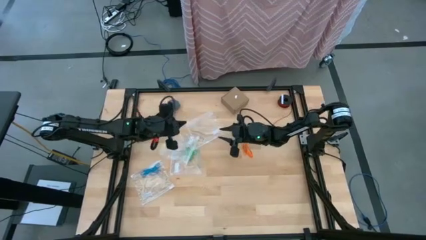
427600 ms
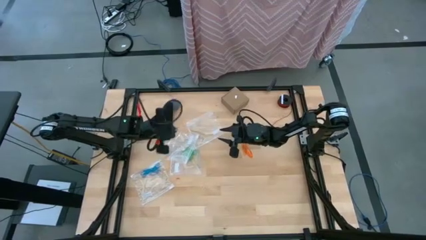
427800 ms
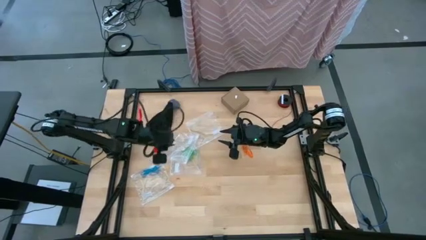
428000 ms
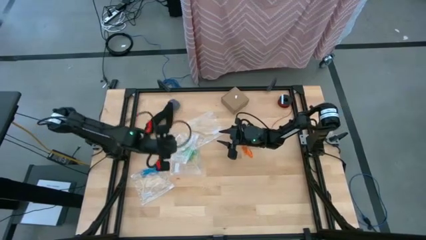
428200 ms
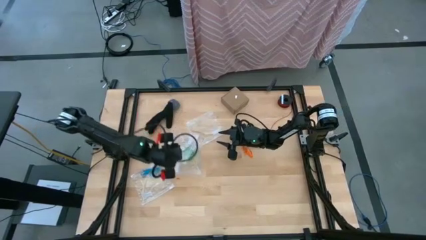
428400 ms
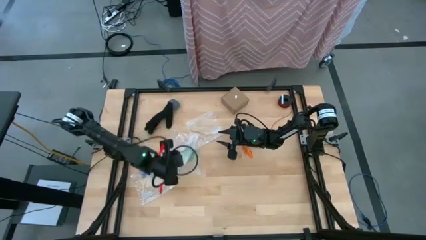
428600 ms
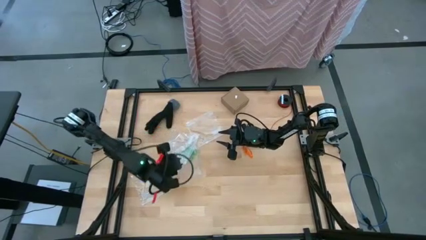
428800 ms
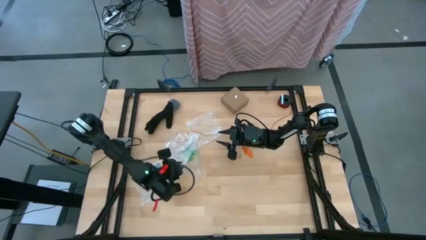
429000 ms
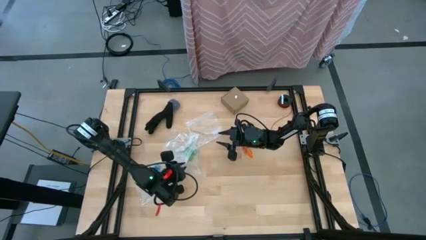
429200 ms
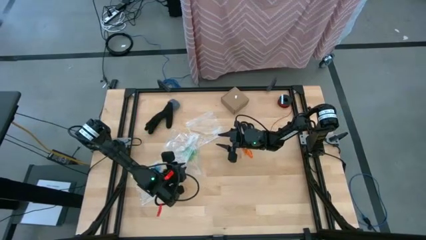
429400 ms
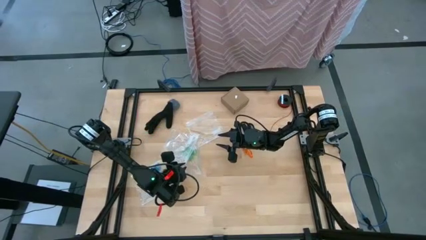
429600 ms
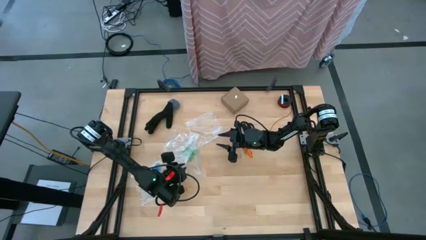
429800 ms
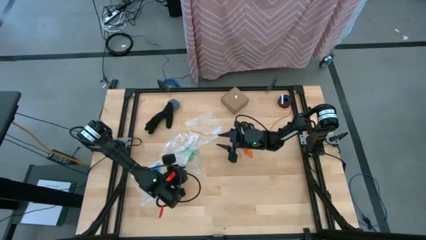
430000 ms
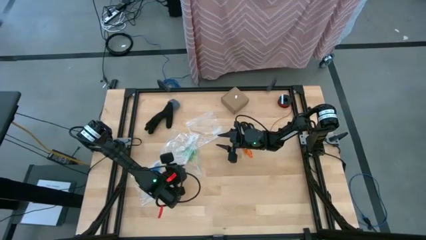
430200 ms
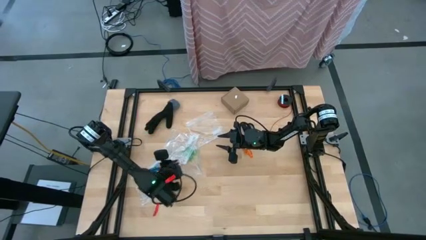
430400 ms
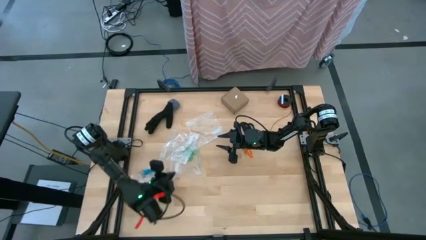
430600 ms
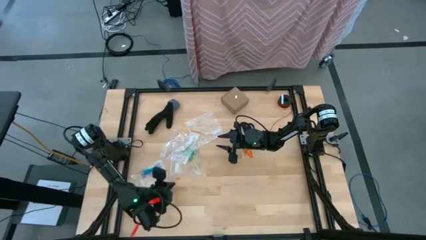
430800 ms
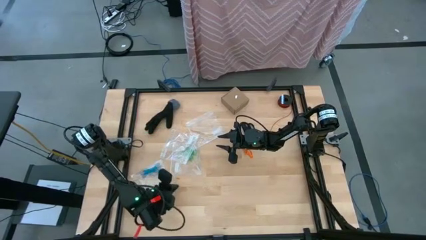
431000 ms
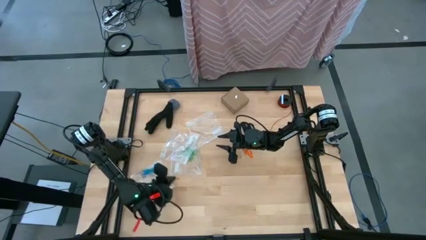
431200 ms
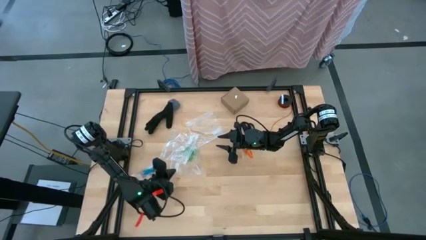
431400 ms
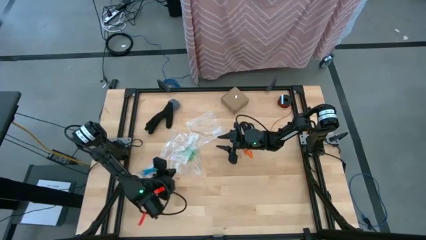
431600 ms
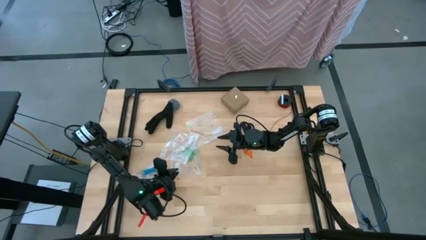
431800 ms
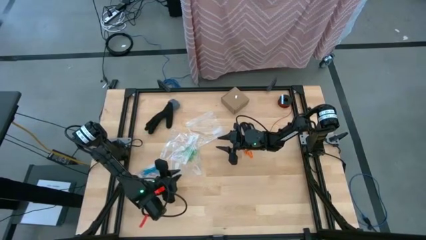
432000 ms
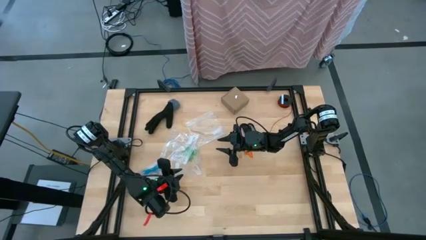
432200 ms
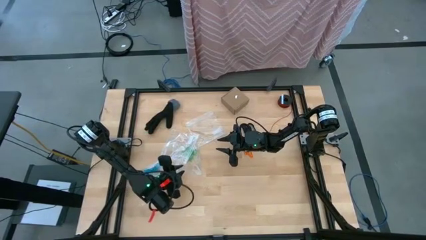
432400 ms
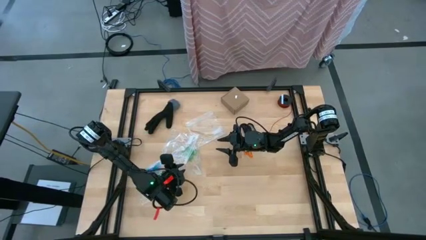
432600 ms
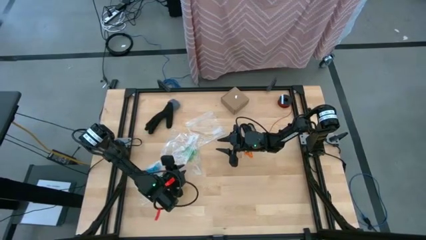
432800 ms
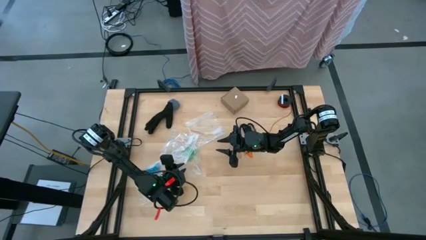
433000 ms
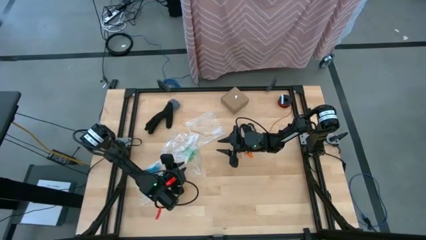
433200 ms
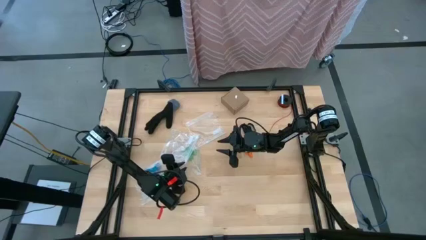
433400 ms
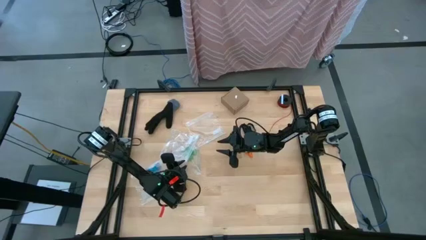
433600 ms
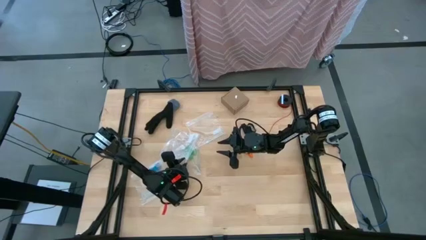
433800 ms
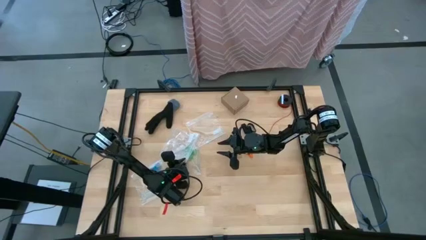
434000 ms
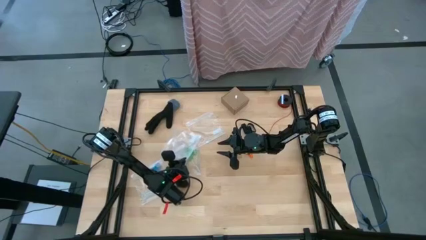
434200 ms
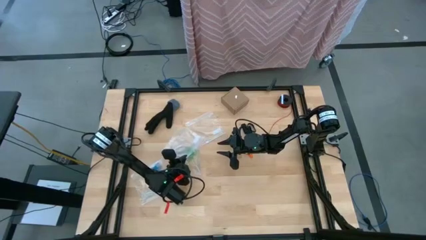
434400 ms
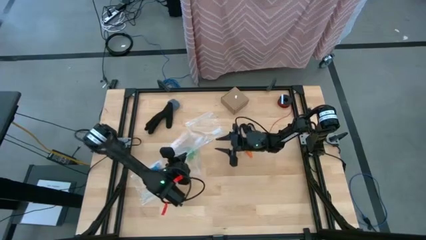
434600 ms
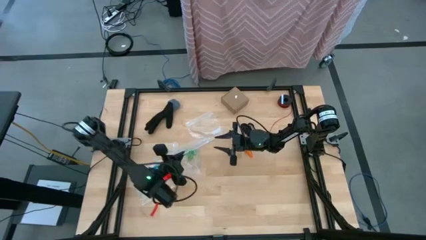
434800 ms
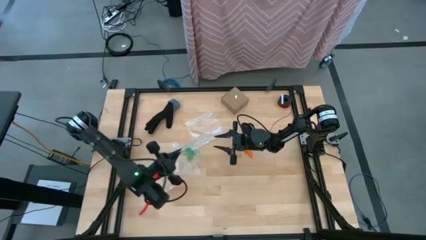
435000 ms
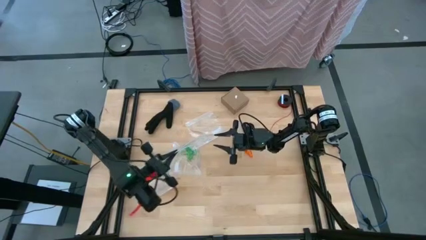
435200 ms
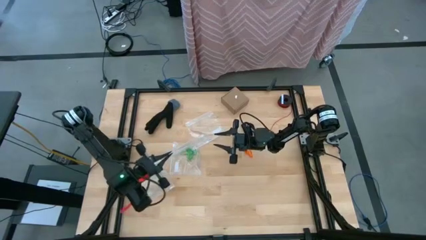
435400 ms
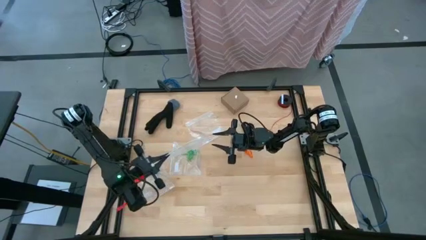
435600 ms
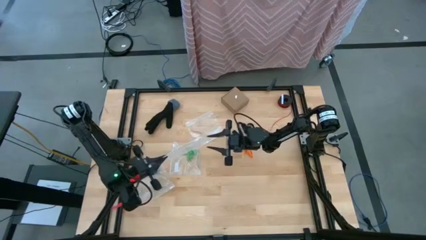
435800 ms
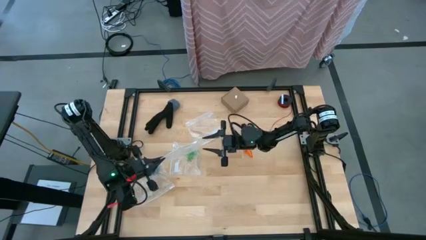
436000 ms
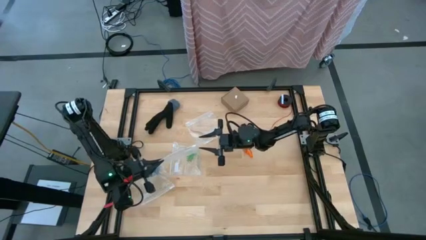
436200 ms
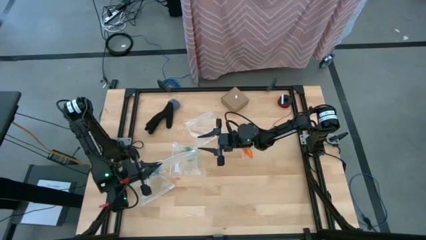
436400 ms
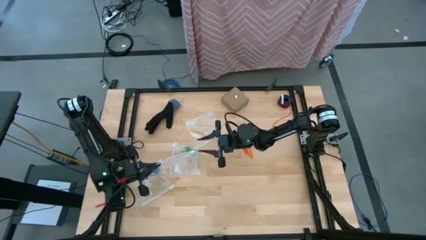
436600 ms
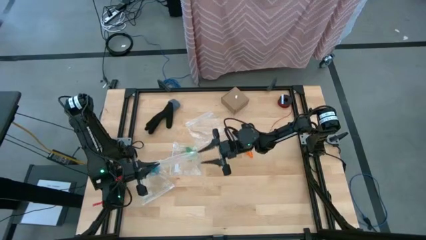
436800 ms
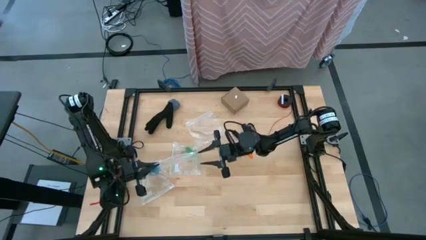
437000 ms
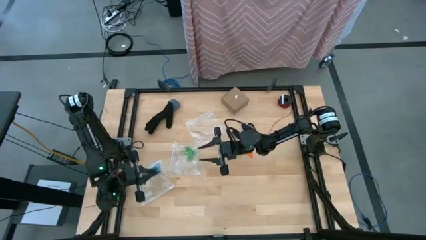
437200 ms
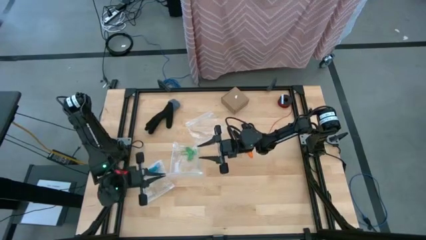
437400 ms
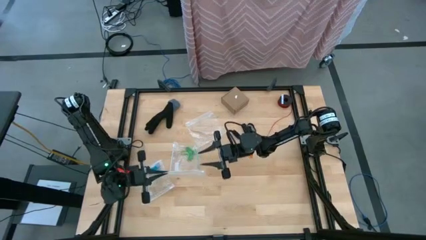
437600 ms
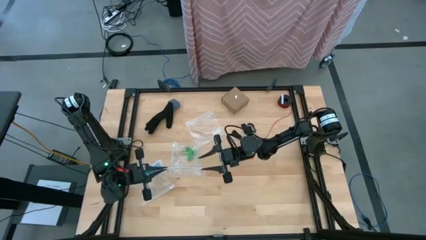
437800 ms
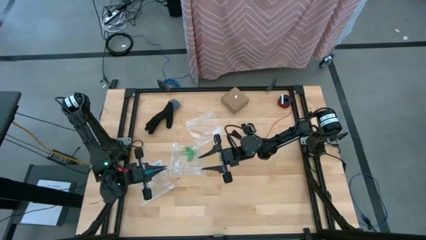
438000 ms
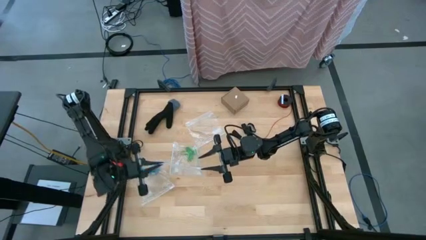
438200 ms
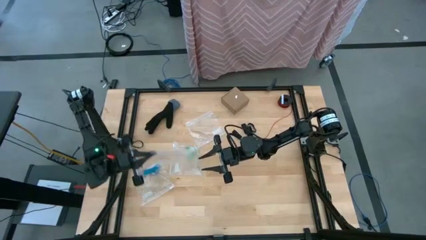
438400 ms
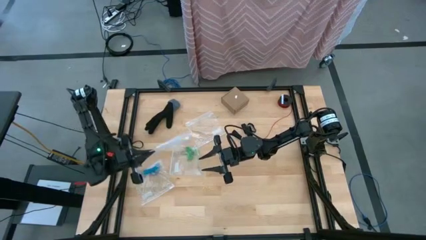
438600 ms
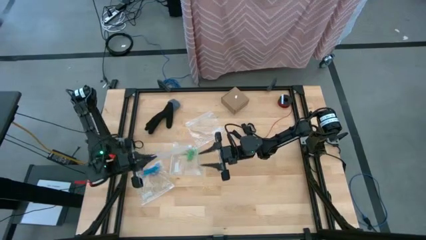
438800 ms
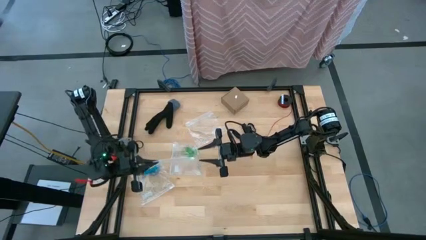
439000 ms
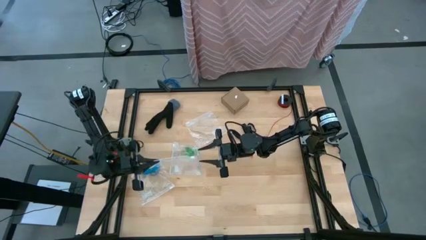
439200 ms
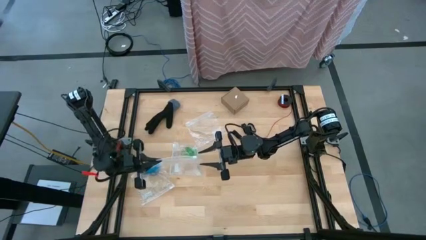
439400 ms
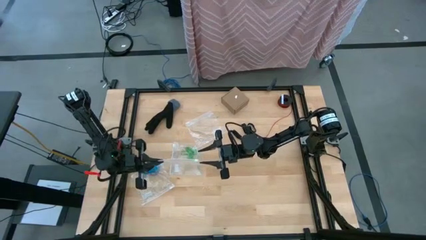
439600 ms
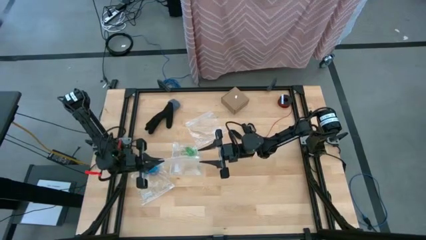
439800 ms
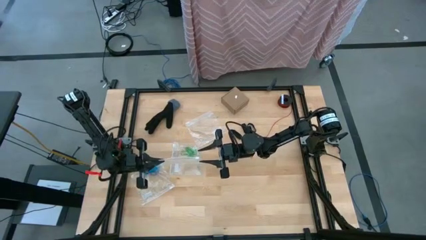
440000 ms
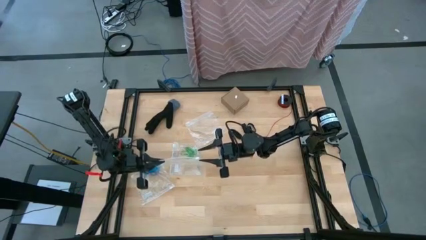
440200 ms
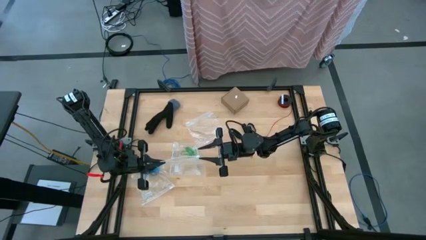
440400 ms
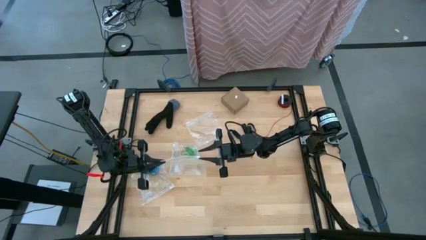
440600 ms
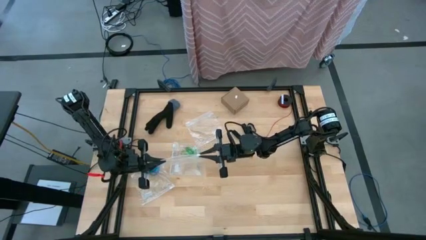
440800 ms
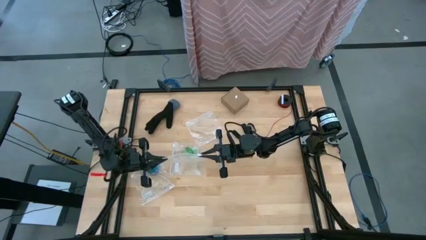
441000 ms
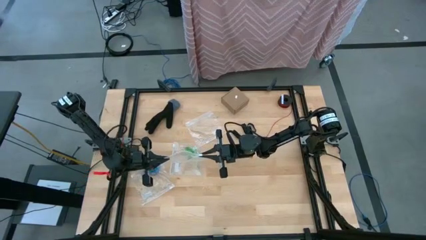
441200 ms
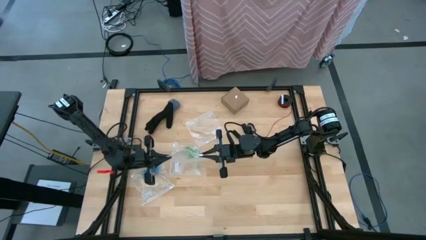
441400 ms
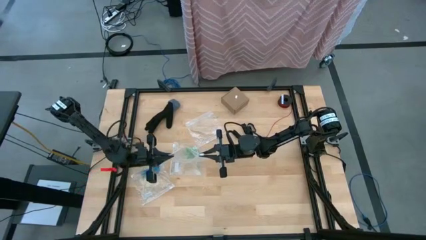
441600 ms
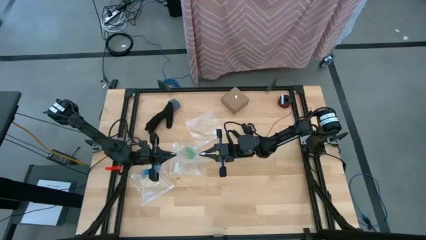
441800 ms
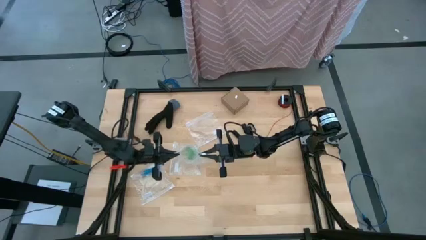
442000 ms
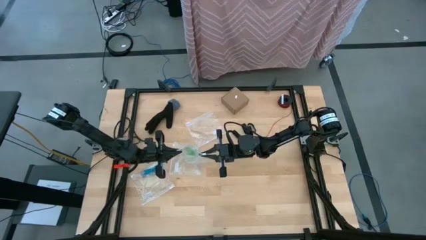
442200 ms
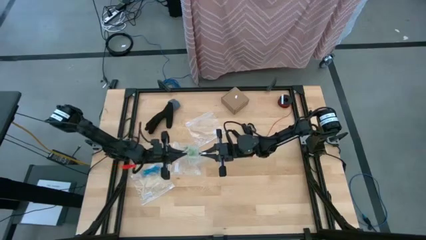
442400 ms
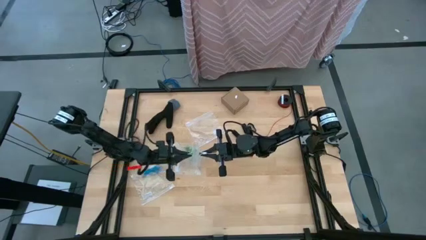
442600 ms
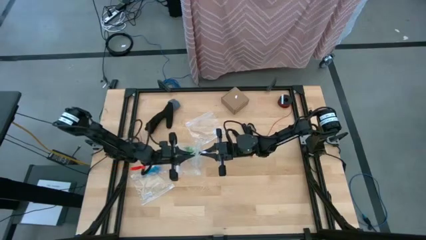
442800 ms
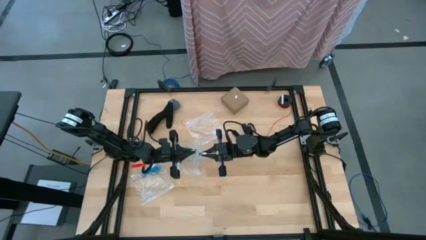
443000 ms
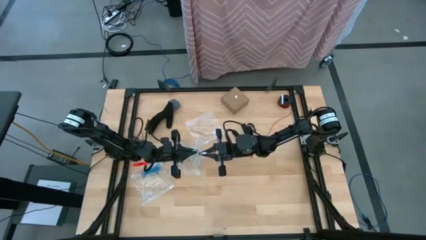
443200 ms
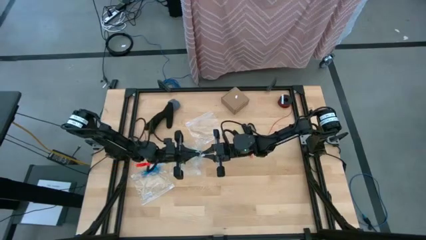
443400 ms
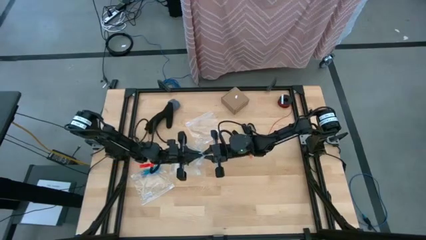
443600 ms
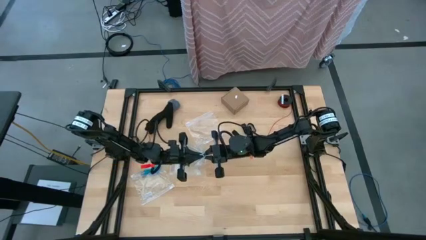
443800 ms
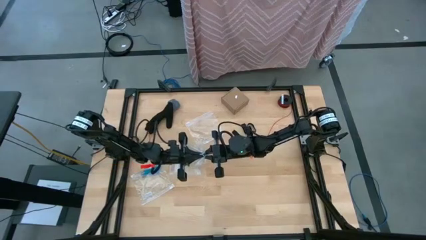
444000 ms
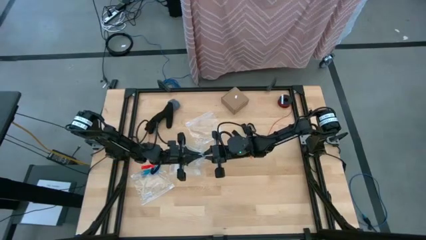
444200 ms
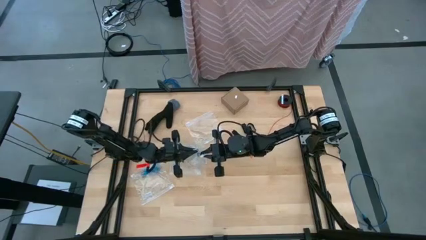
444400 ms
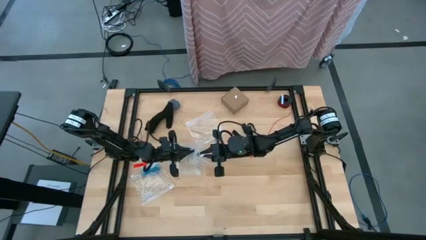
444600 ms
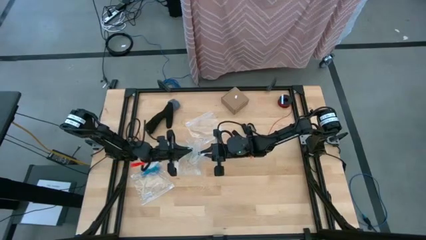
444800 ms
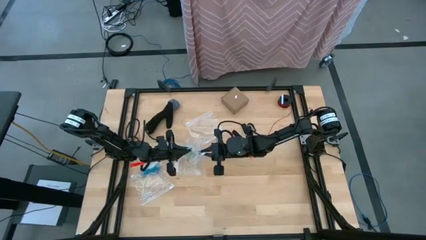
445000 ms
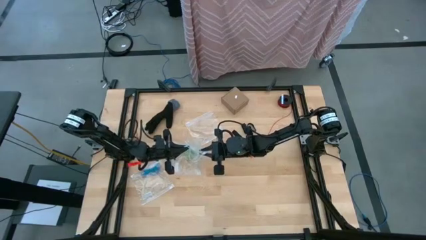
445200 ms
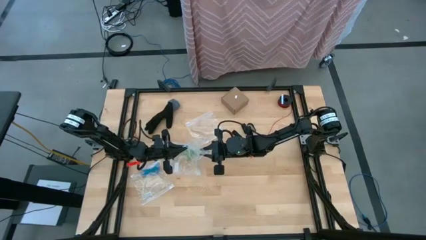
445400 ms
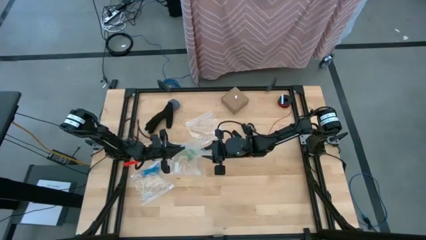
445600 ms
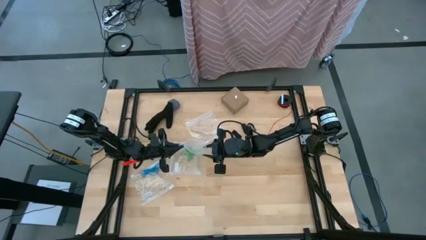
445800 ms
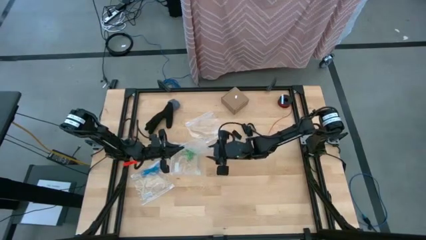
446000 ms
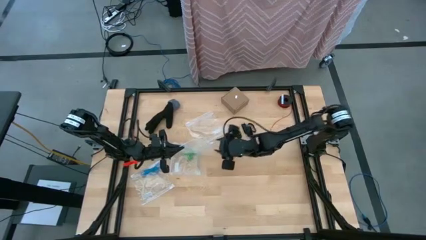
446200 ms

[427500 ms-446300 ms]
Task: Sort rubber bands
Open the transparent zip bag
